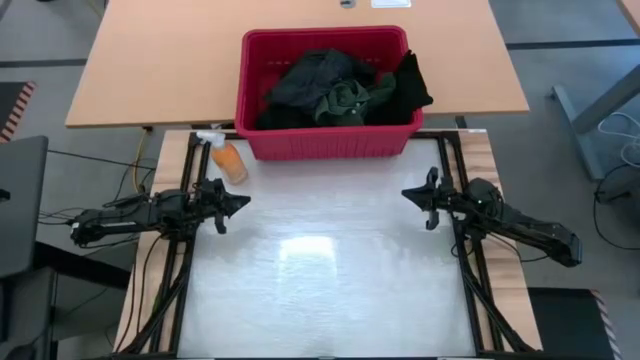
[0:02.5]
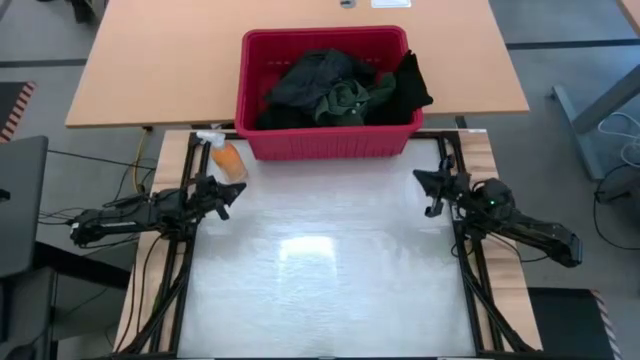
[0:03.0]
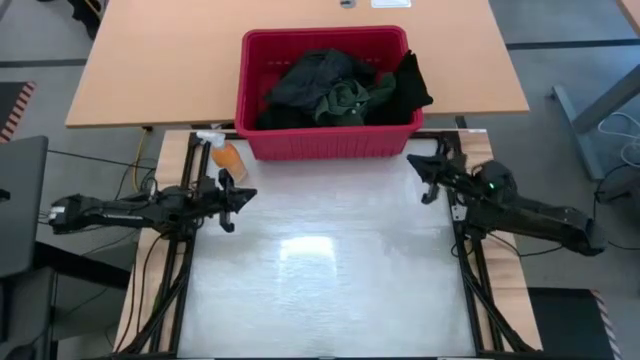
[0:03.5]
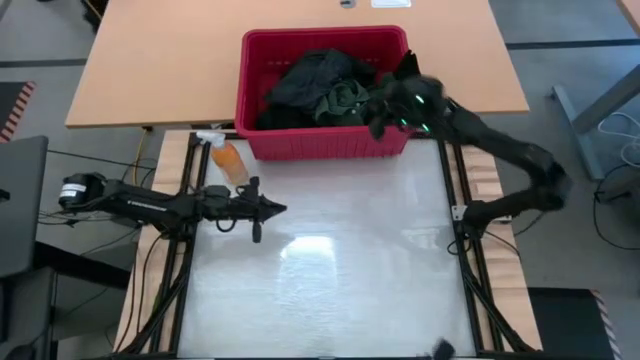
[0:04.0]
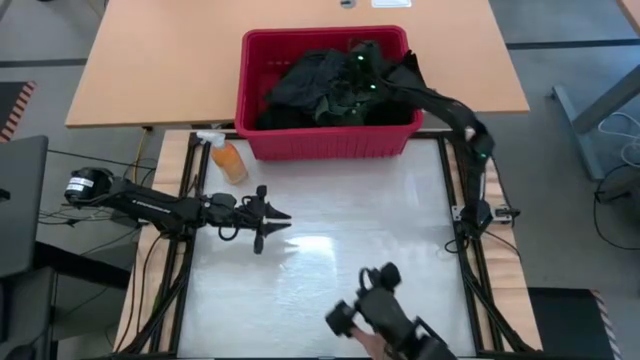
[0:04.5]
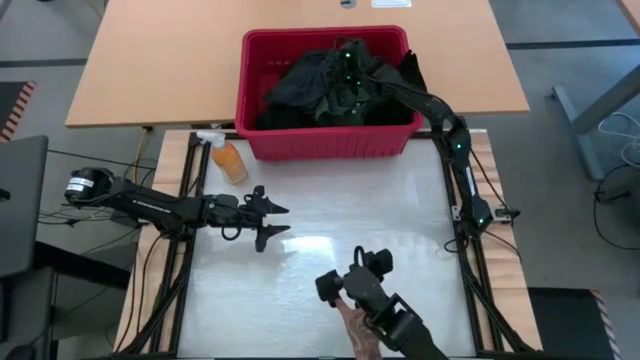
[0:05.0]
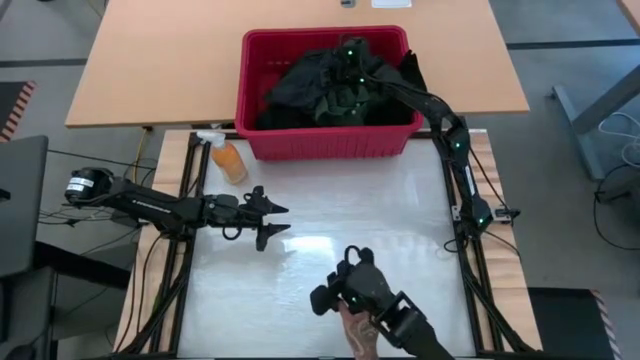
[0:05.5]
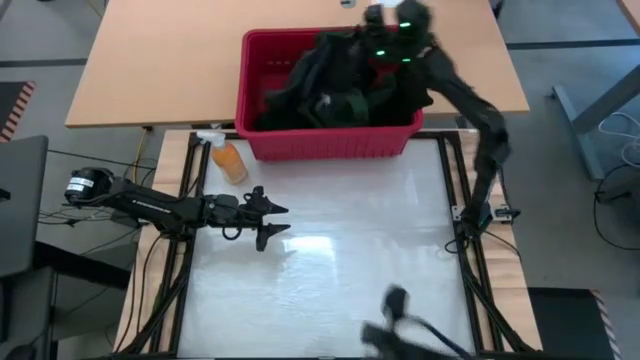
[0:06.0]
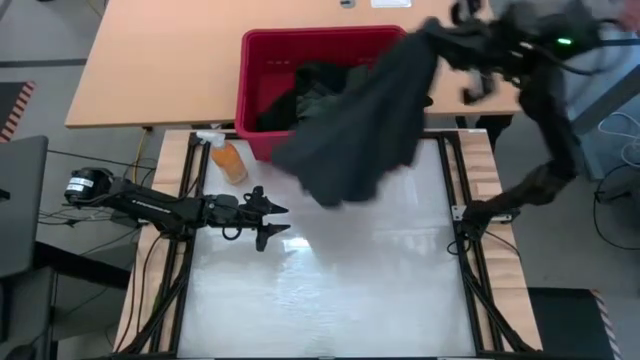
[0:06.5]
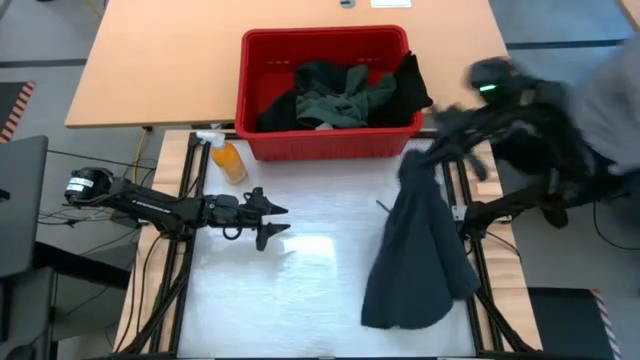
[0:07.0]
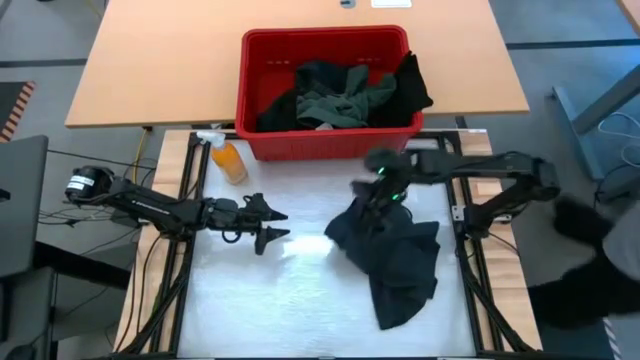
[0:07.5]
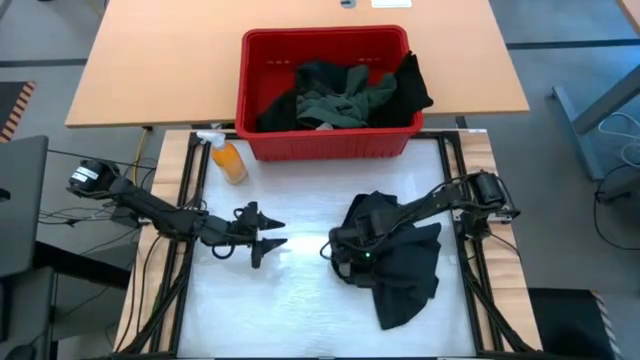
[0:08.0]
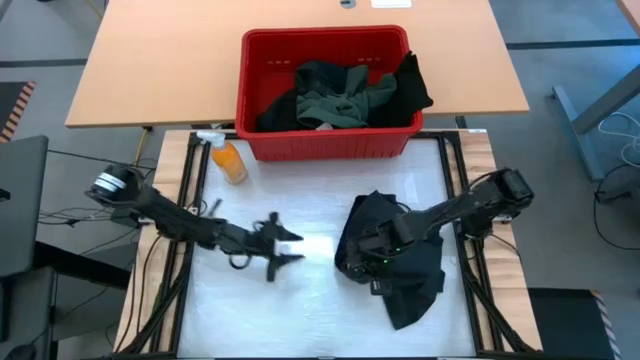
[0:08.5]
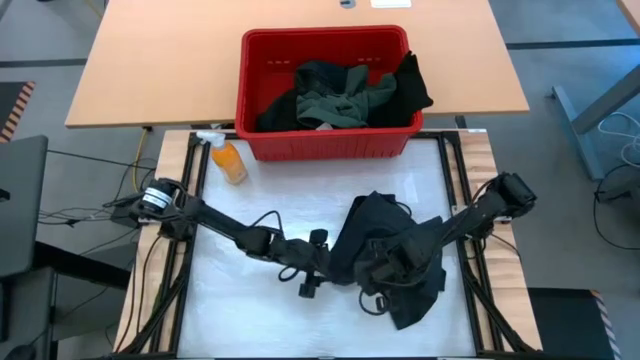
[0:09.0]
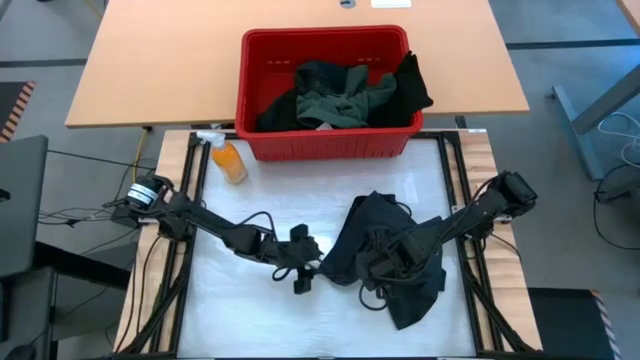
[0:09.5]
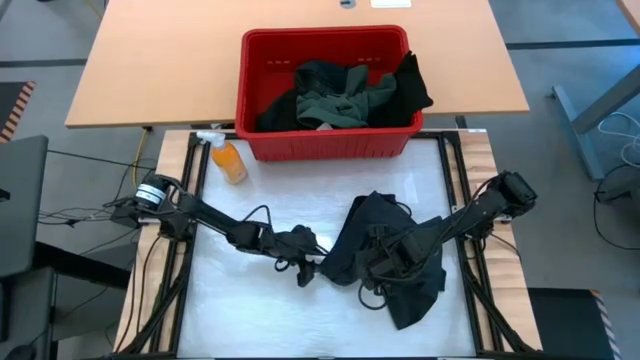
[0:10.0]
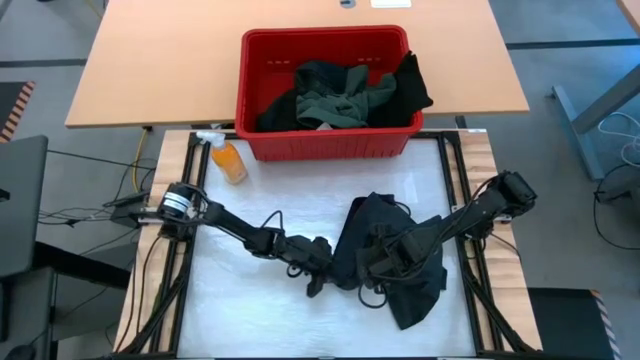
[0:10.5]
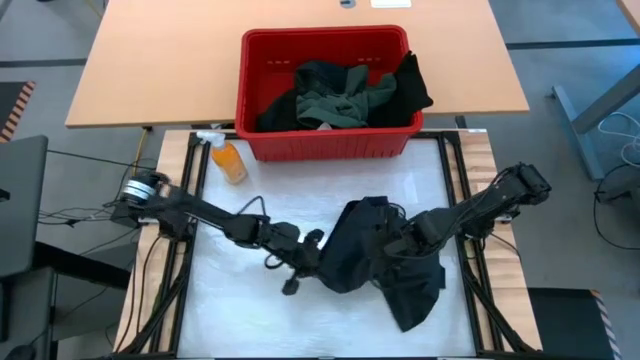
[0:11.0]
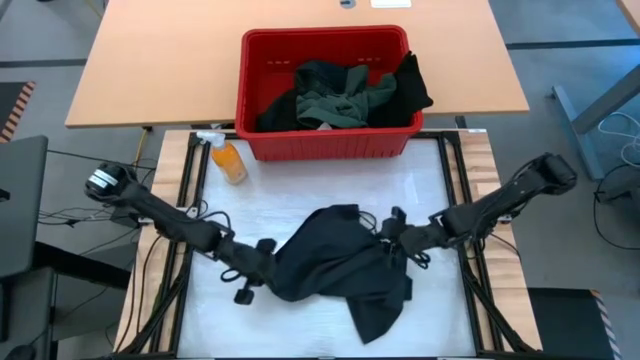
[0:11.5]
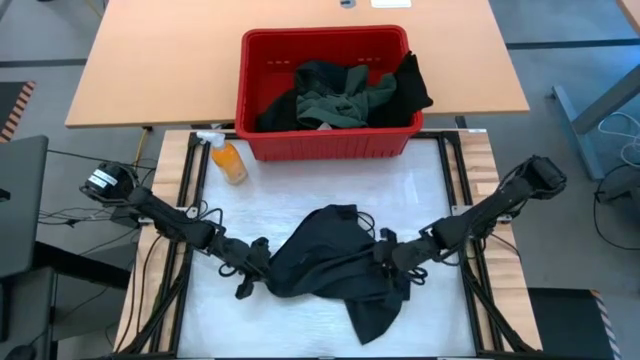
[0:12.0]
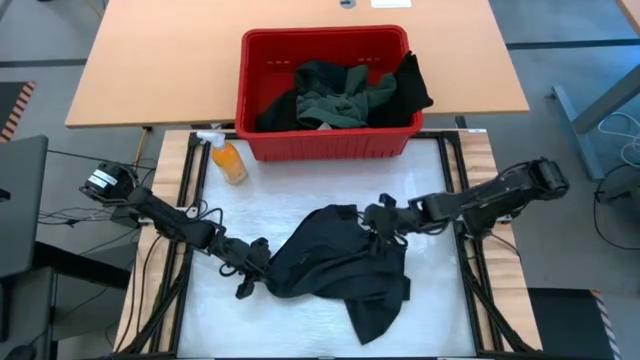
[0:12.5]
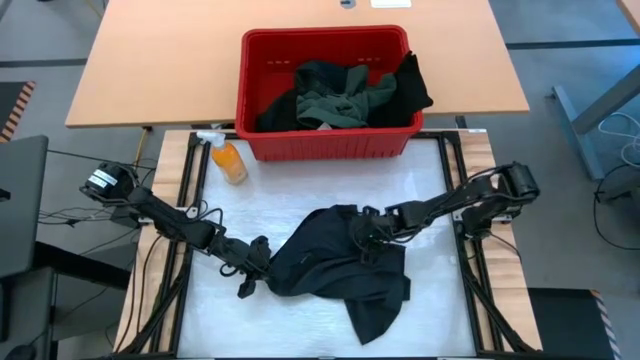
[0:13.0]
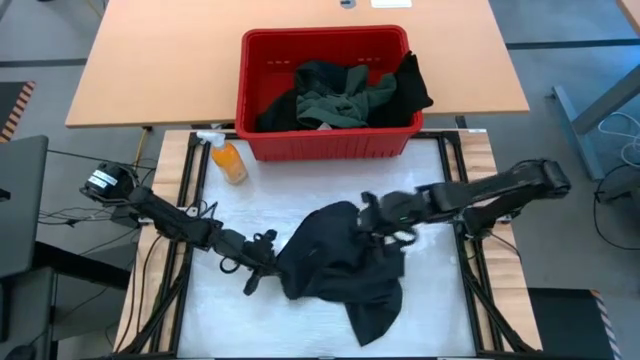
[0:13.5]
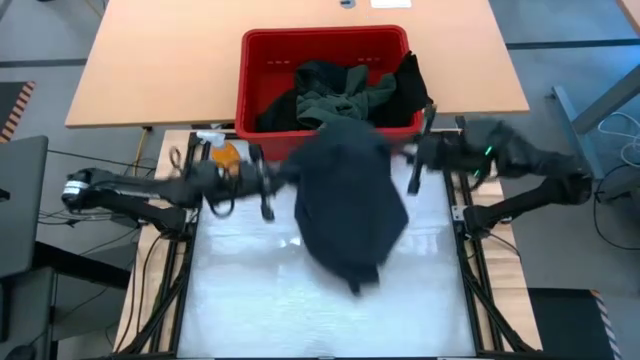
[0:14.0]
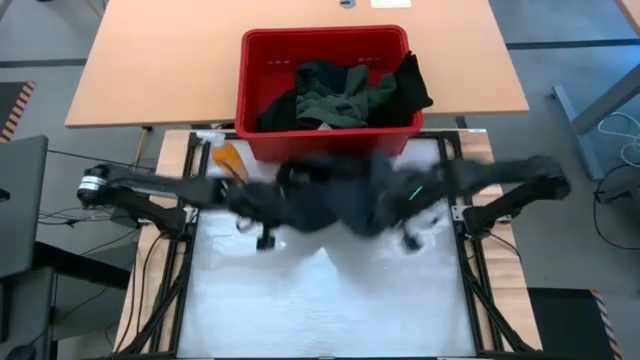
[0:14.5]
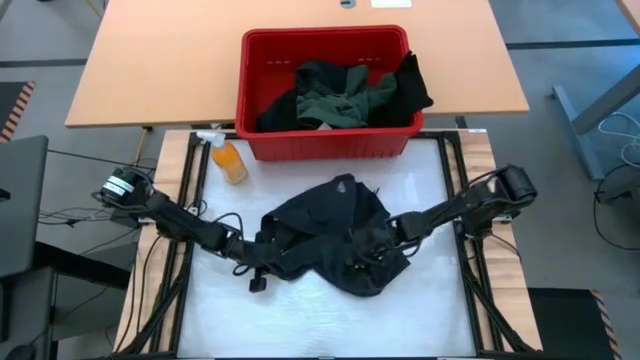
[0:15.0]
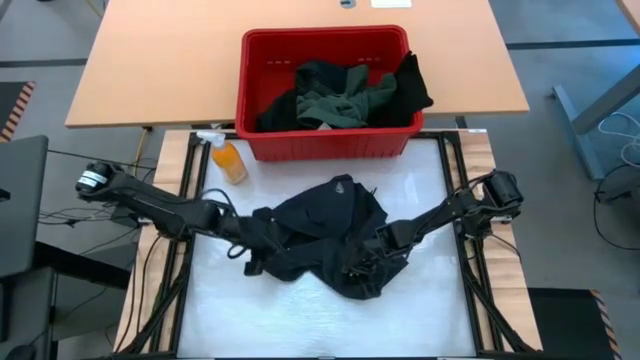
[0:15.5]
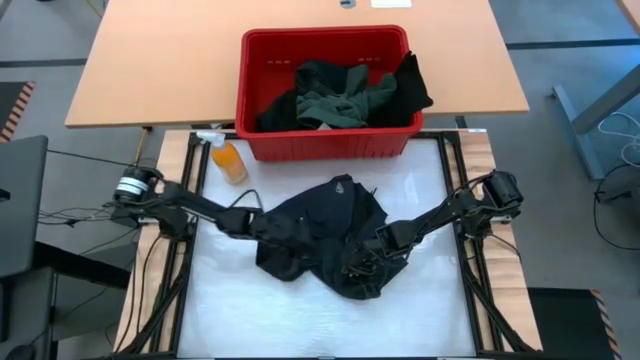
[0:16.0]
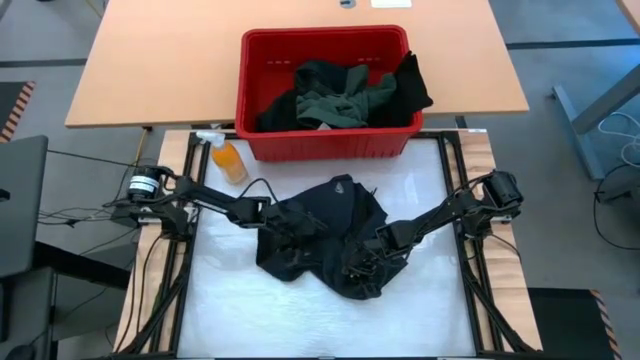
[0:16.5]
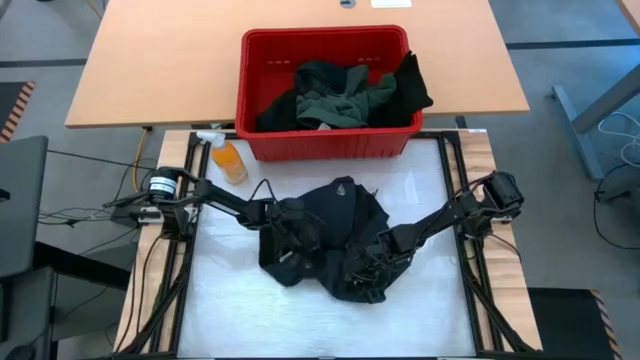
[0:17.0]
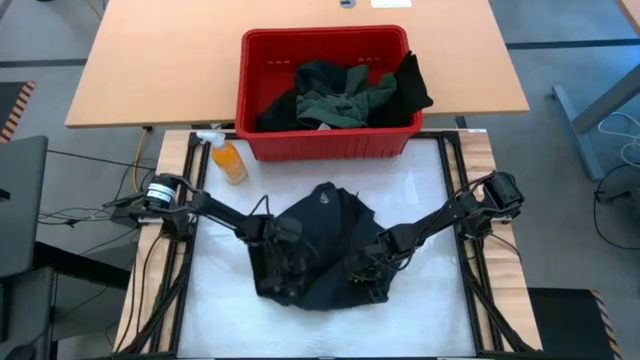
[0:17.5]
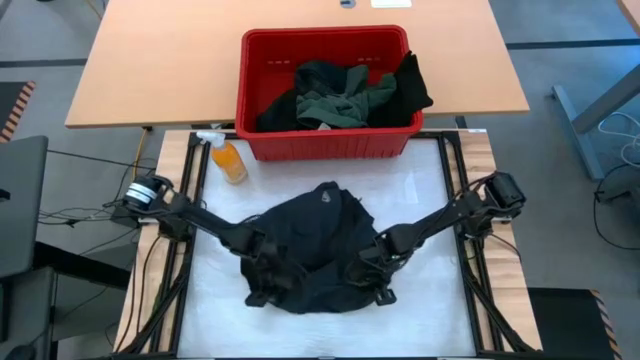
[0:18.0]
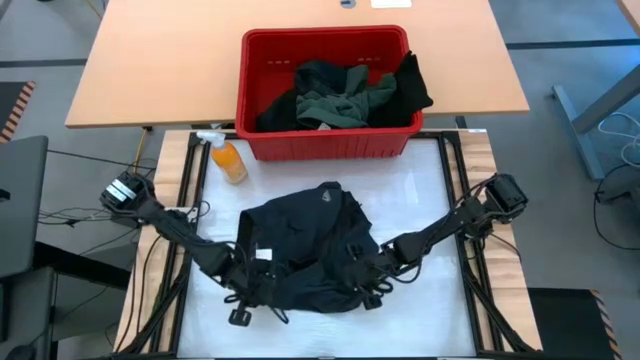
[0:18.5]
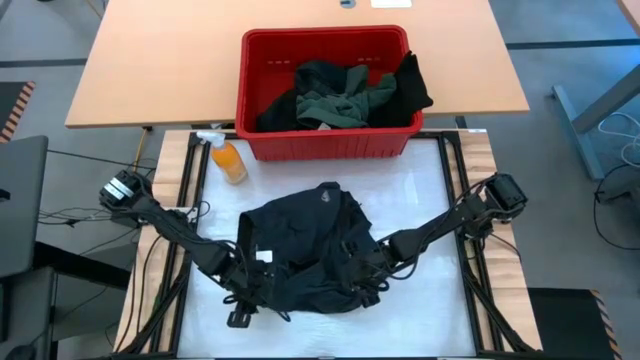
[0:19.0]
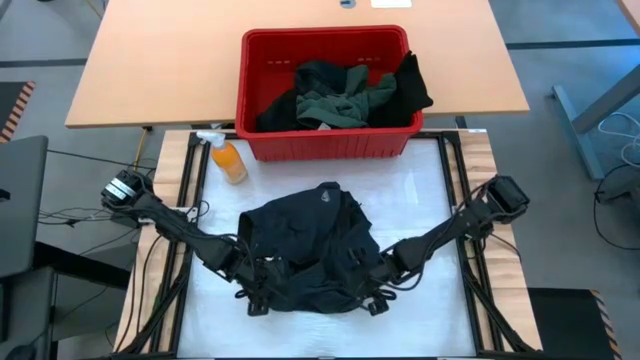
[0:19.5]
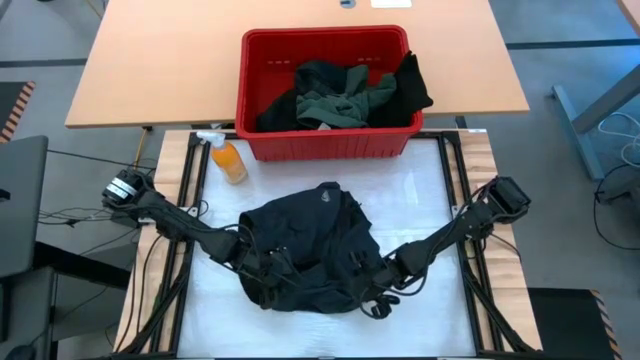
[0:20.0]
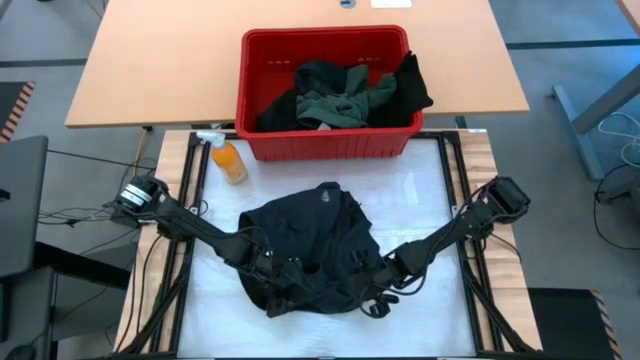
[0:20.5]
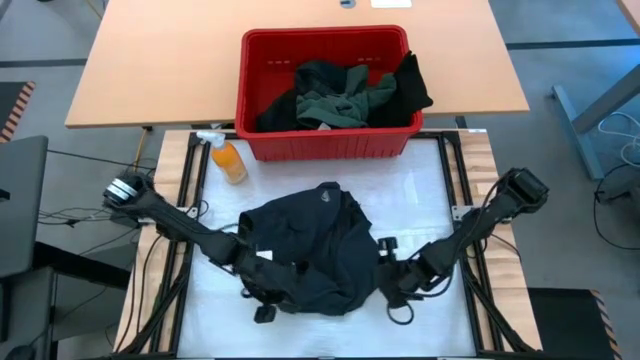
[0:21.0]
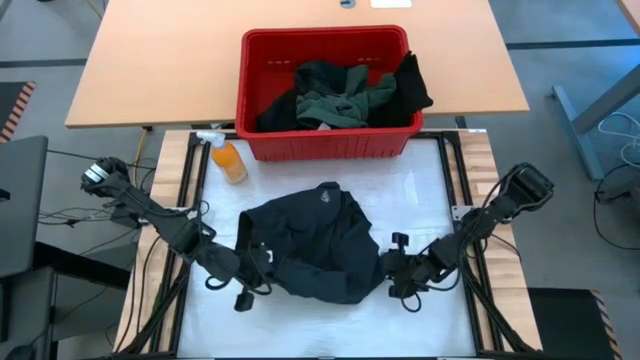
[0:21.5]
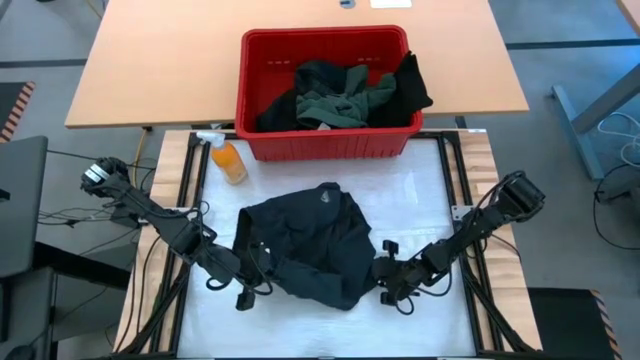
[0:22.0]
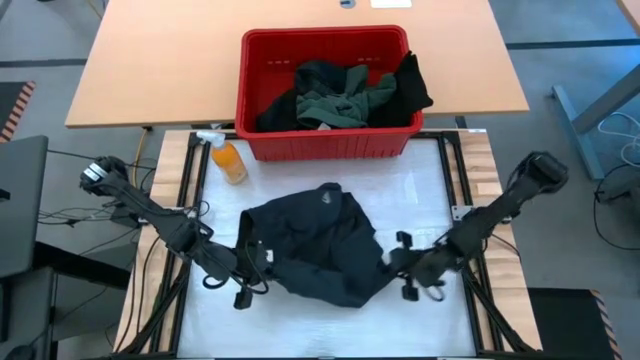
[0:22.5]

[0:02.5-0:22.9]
Task: Fold laundry
Fold the black shorts
